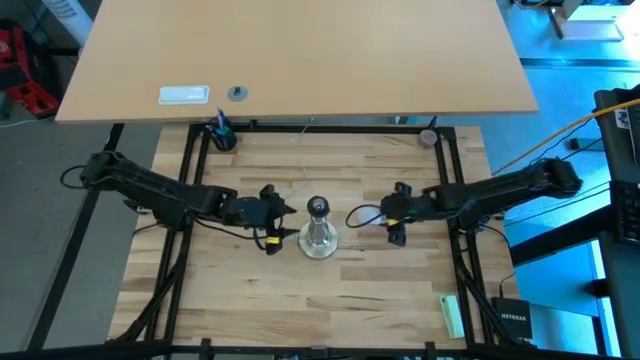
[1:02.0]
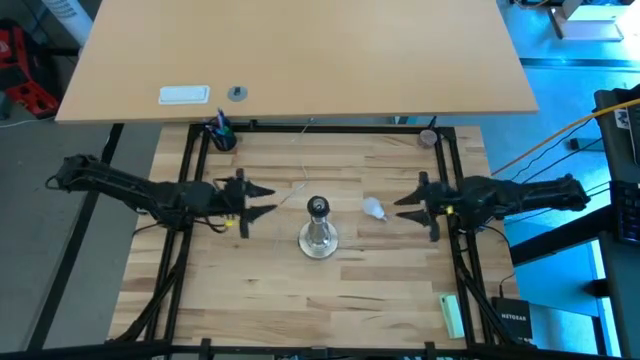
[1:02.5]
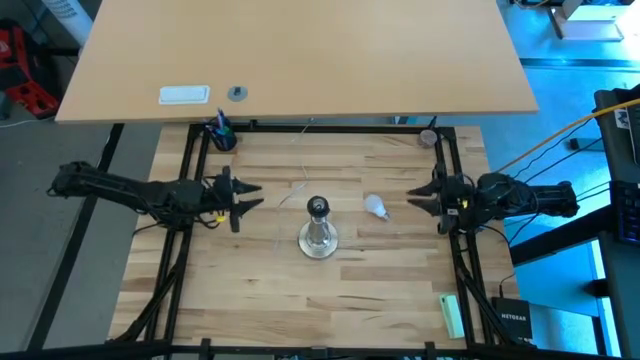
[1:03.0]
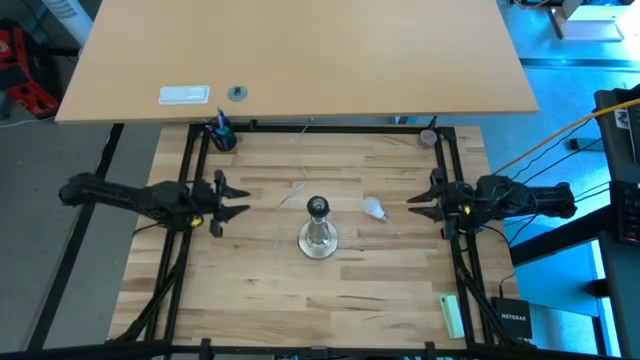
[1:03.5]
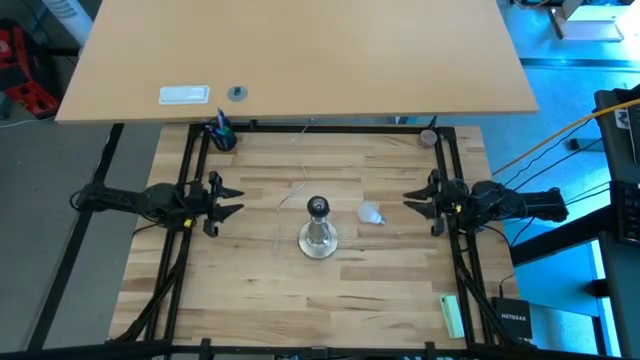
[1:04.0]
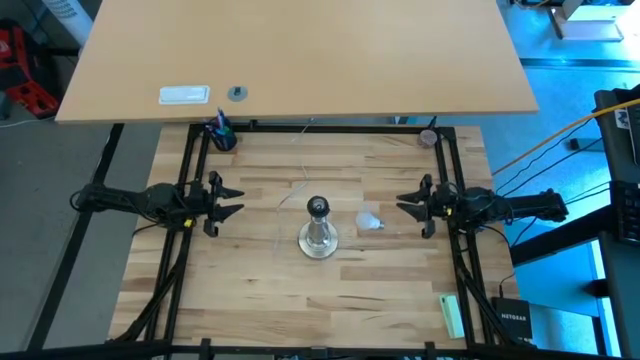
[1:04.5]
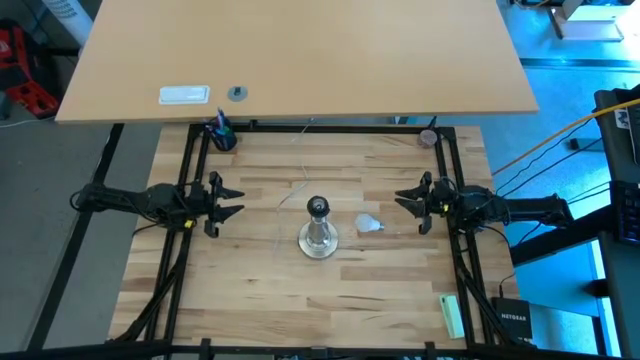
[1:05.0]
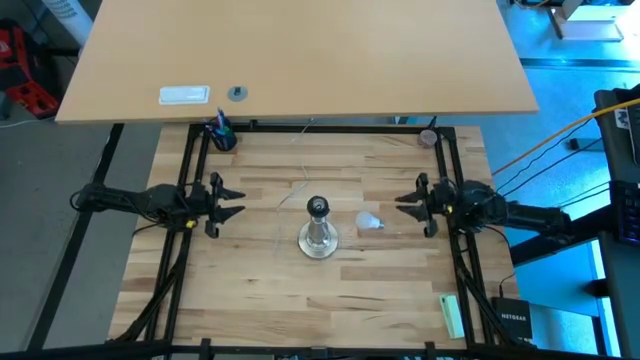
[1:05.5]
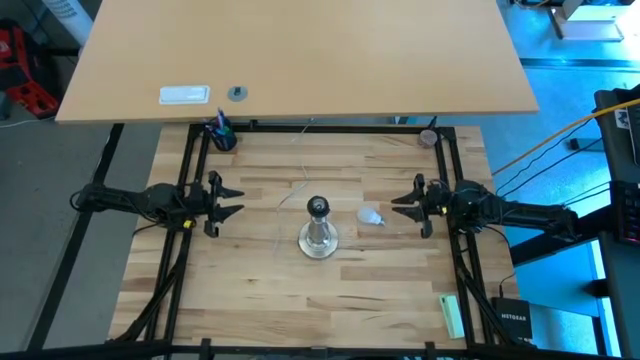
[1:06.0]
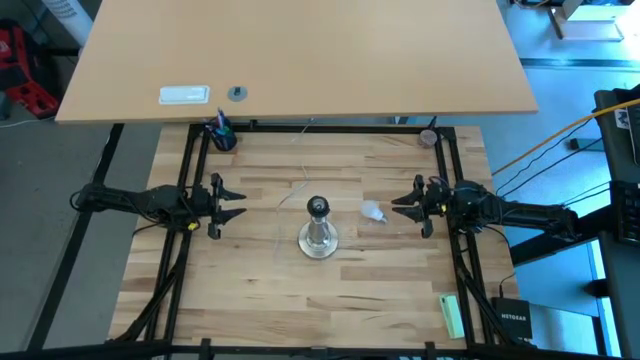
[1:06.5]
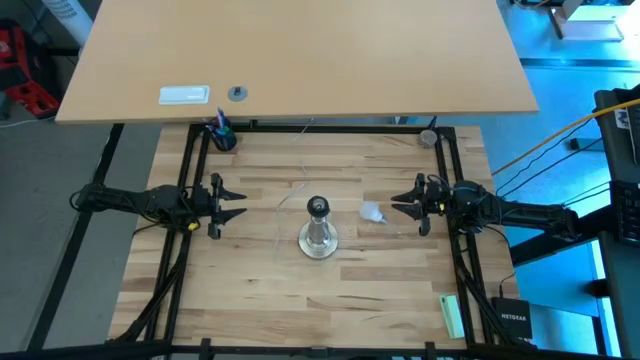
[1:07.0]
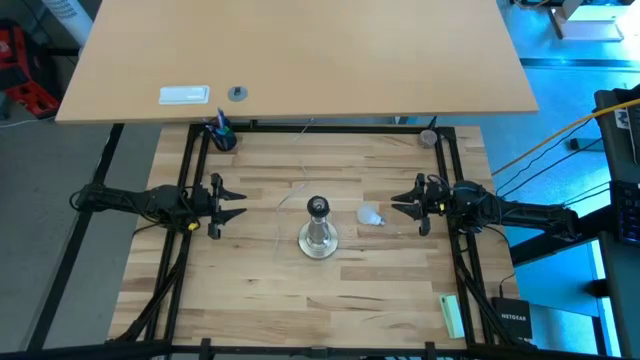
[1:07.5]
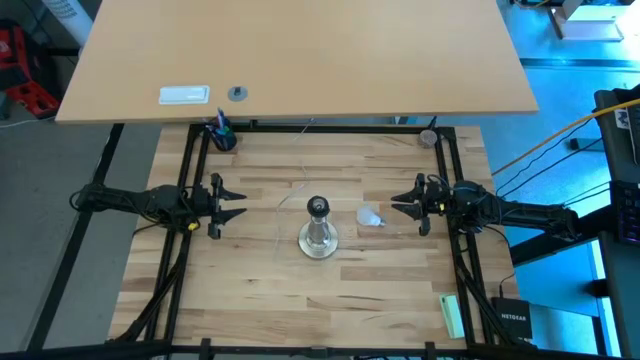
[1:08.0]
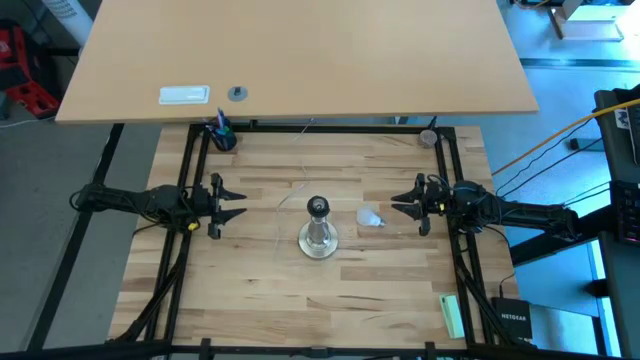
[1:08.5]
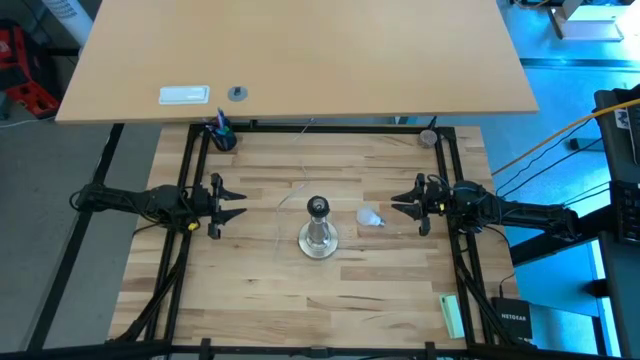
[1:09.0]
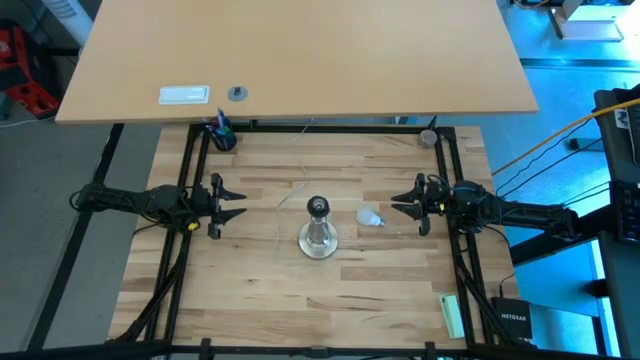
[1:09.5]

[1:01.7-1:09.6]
Task: Screw lightbulb
Return to Home Position

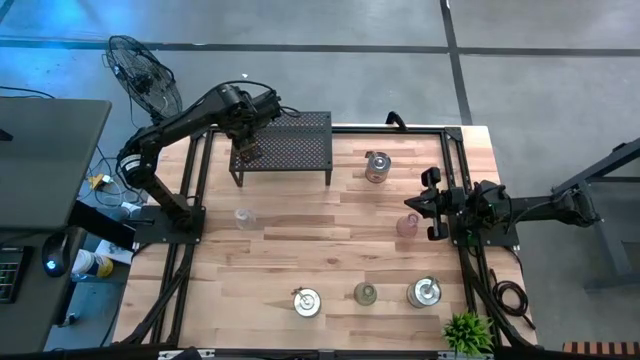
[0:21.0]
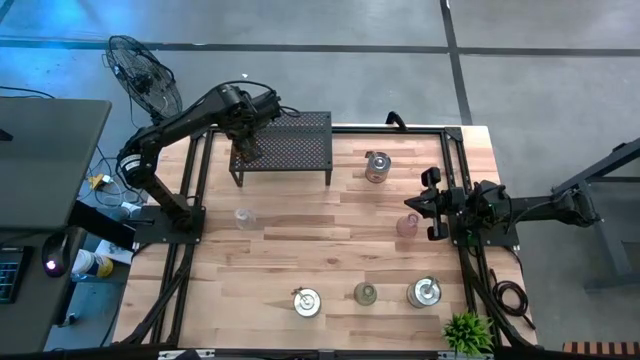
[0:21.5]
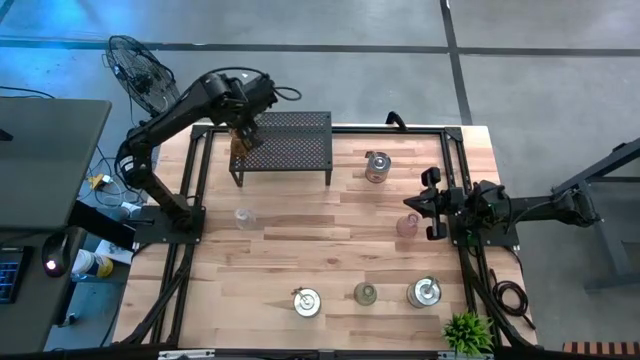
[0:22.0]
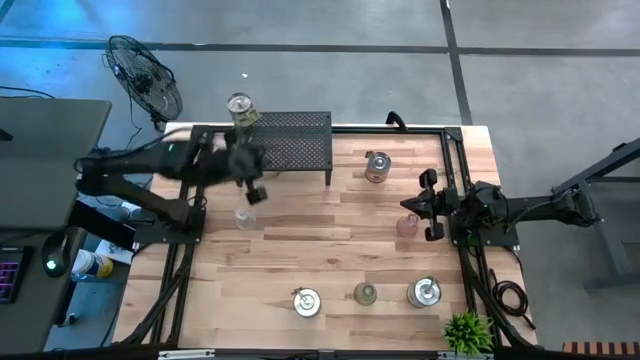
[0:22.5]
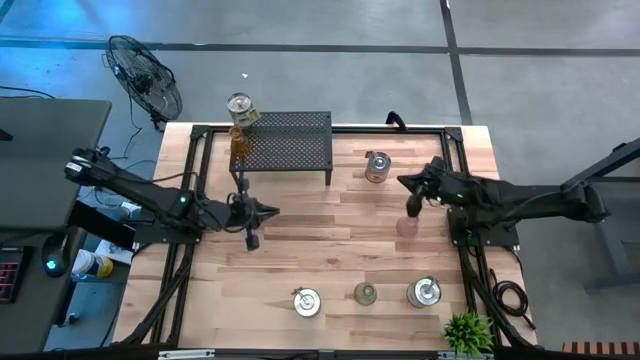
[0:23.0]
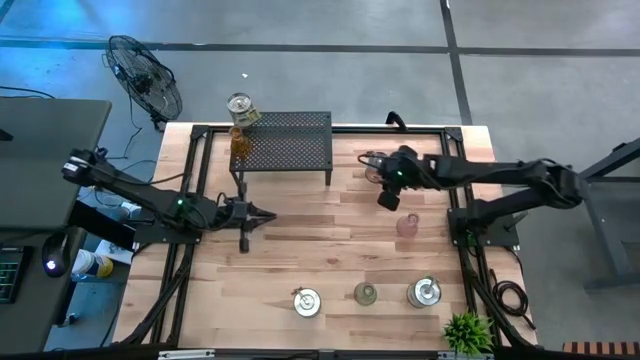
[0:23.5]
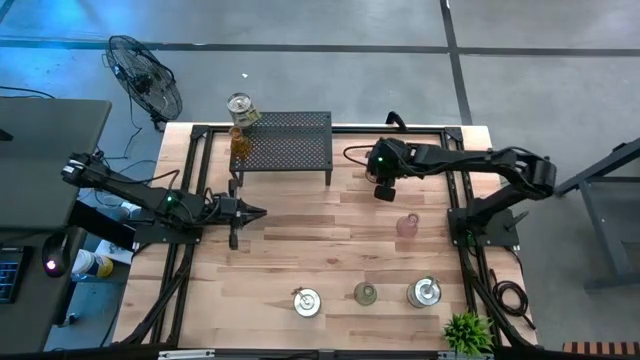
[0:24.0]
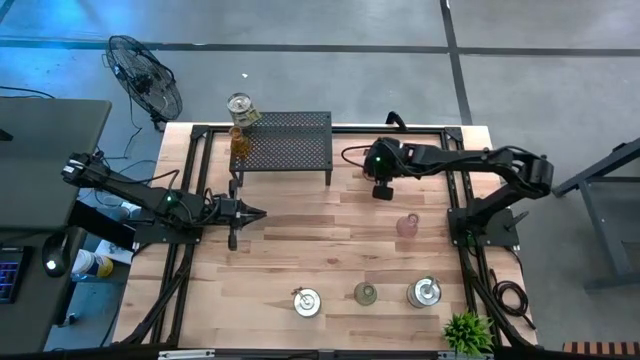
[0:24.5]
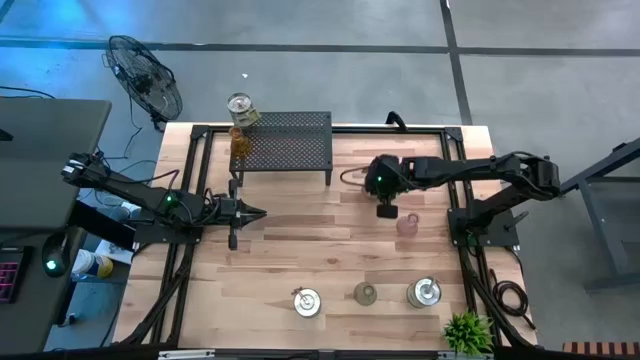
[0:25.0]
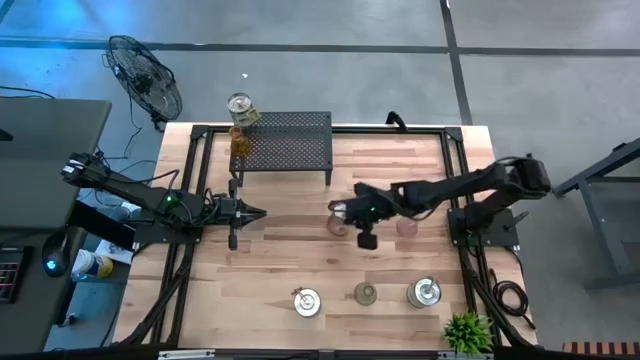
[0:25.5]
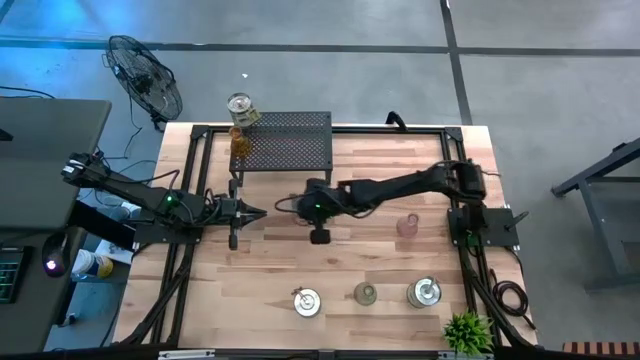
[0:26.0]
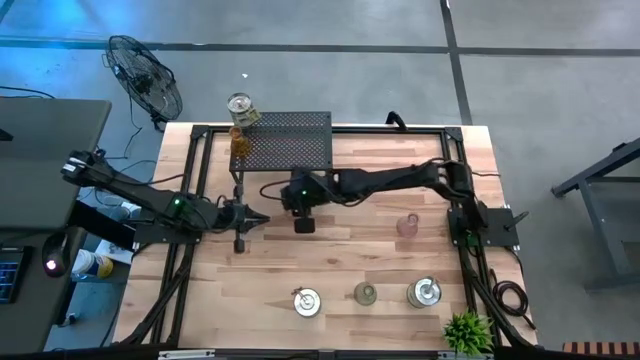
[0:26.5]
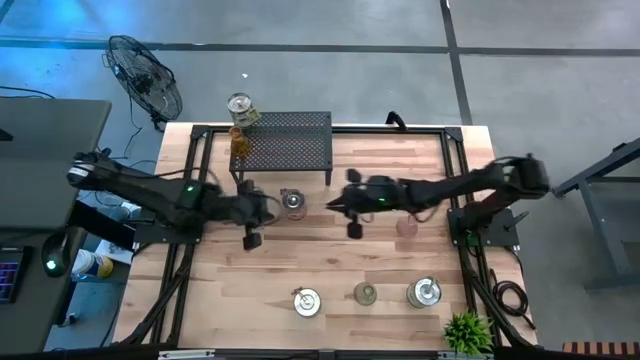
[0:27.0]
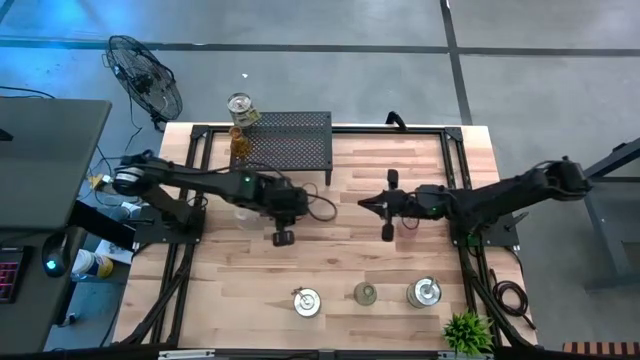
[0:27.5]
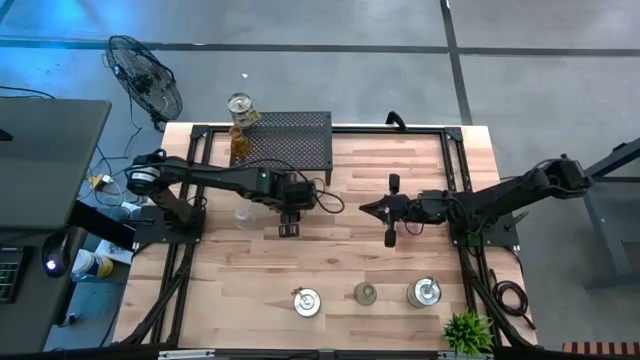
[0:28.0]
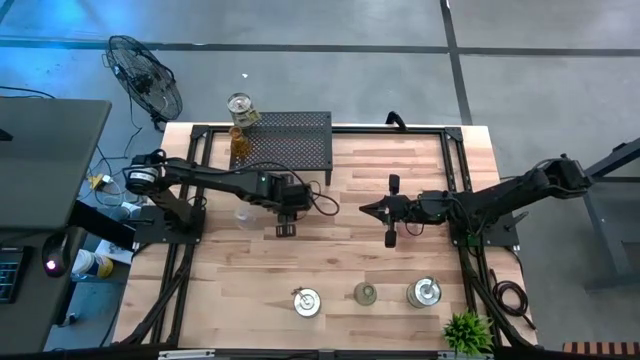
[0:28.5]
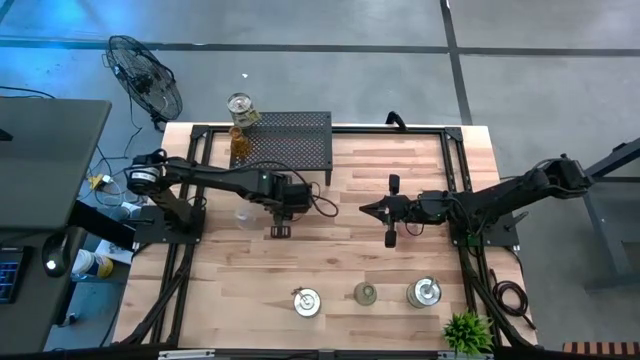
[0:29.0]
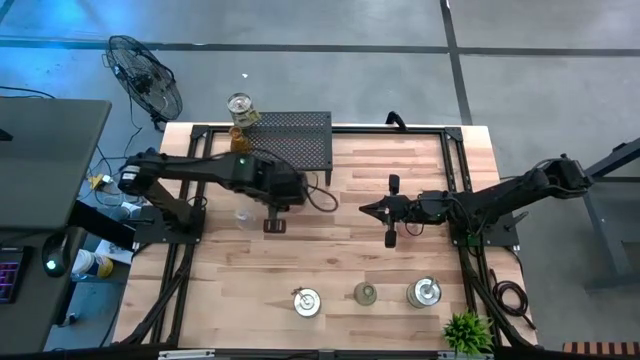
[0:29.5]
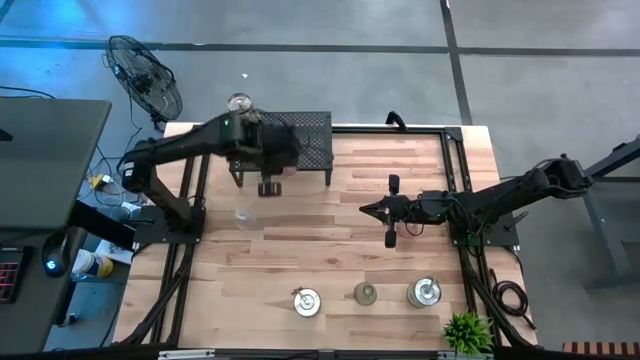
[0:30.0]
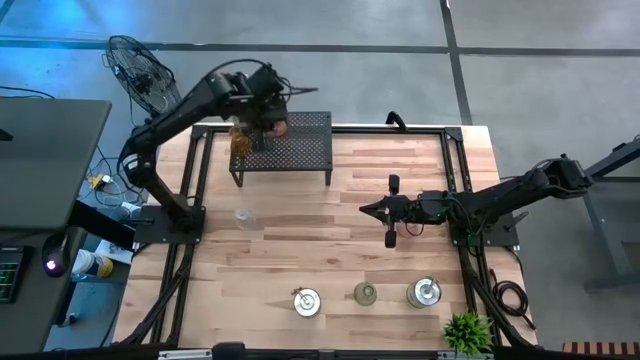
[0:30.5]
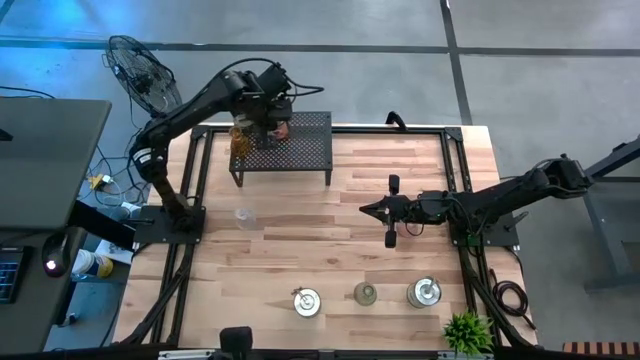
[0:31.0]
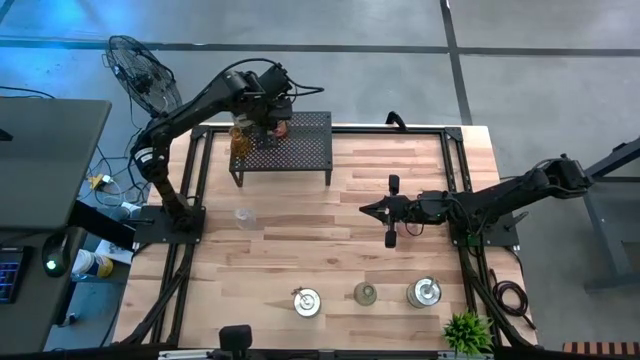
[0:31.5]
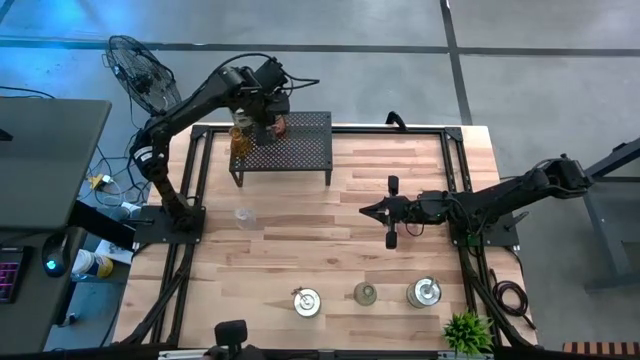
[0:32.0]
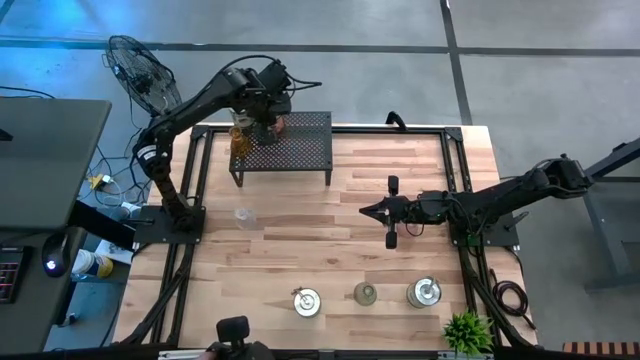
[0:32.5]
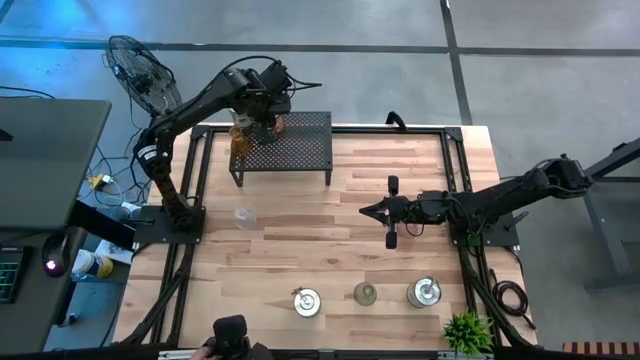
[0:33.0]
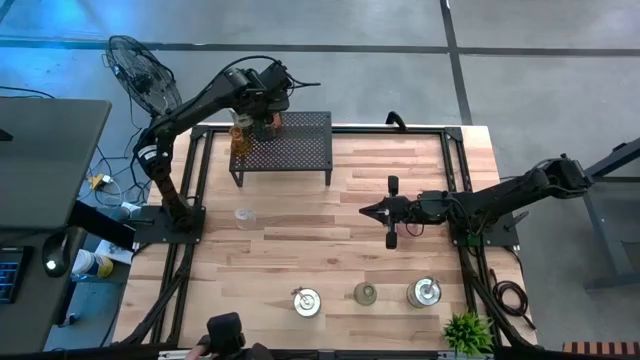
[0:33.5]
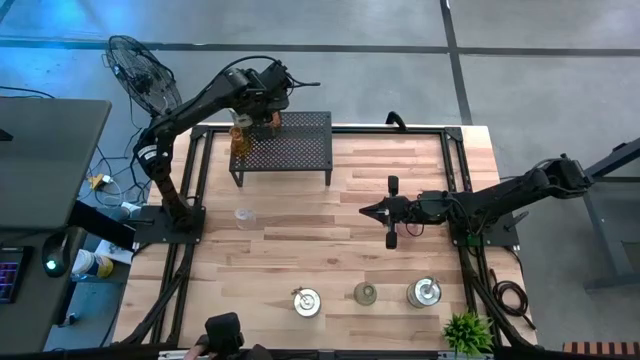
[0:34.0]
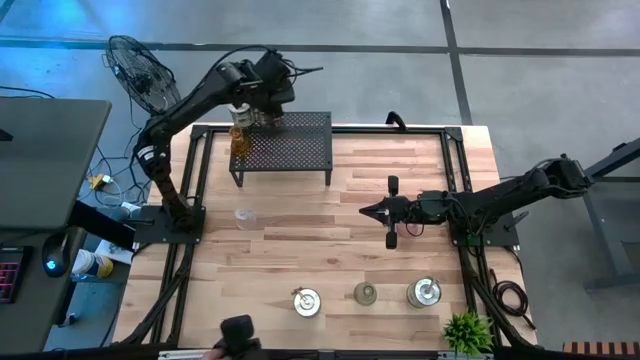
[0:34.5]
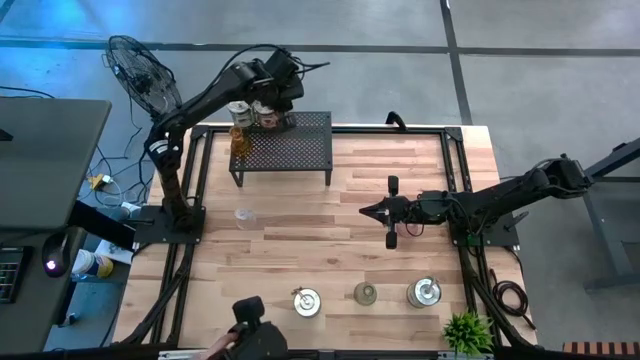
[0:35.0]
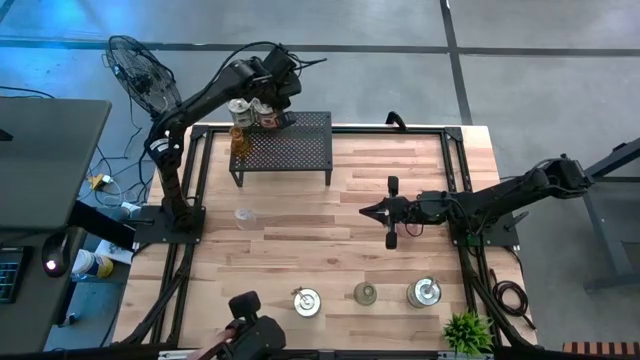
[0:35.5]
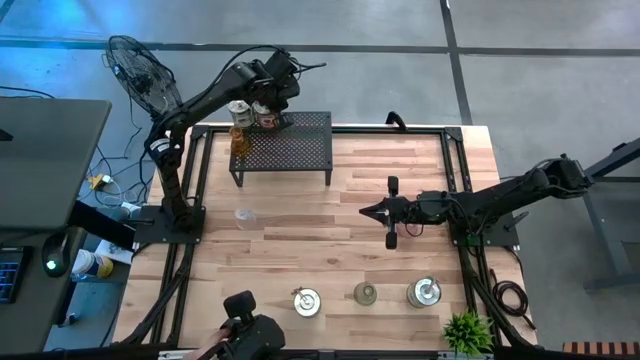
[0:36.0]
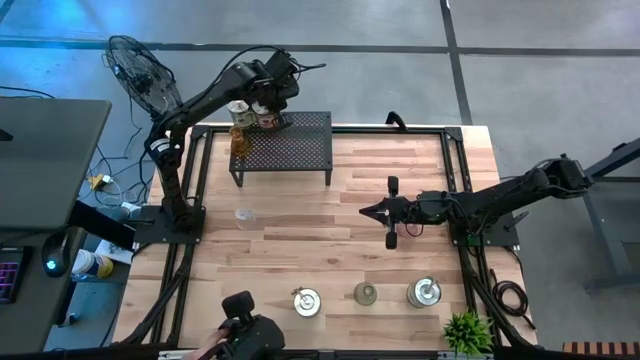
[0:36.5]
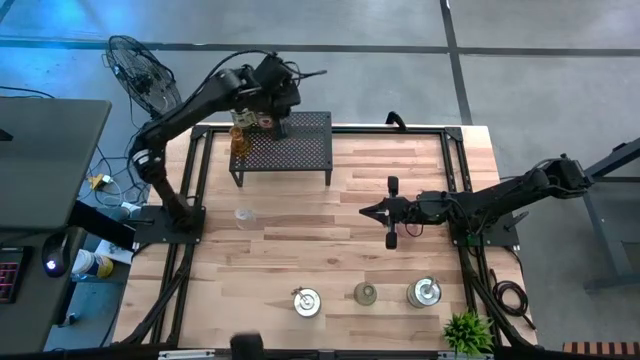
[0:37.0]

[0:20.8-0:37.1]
Task: Pick & Place candle stick holders
Put the orange scented candle on the shelf
